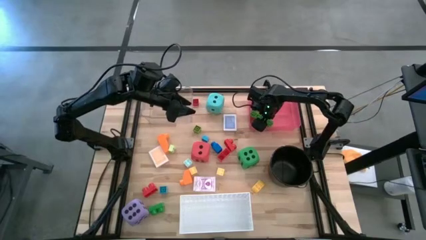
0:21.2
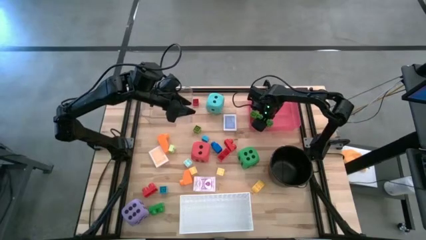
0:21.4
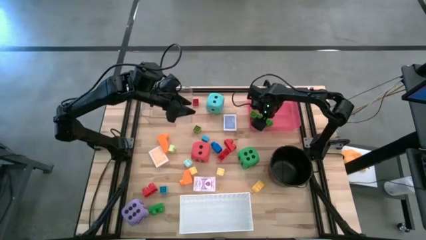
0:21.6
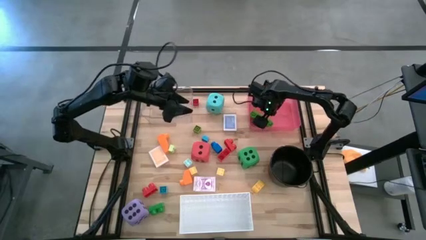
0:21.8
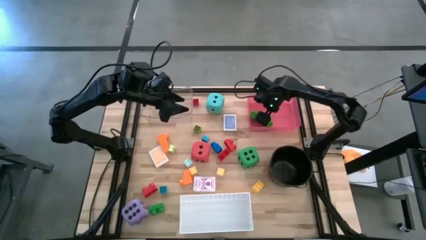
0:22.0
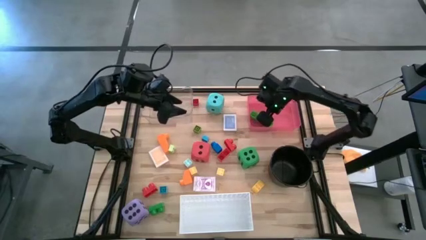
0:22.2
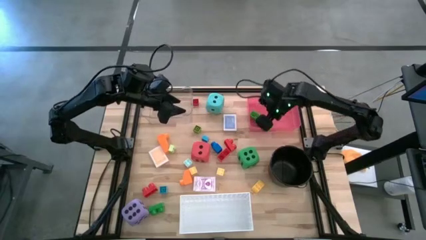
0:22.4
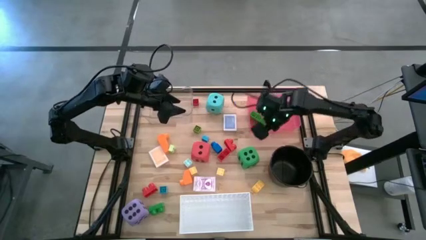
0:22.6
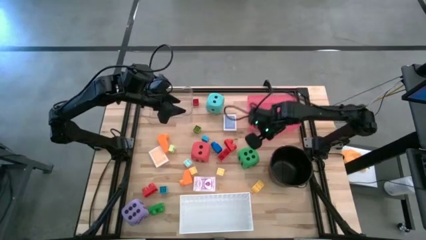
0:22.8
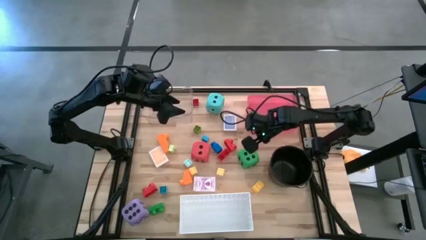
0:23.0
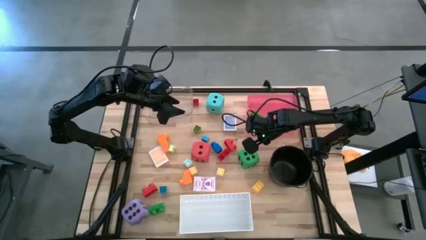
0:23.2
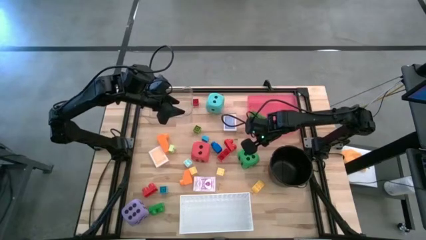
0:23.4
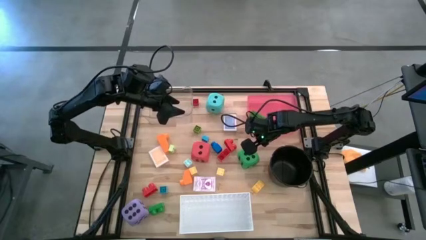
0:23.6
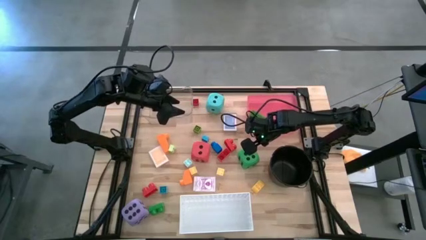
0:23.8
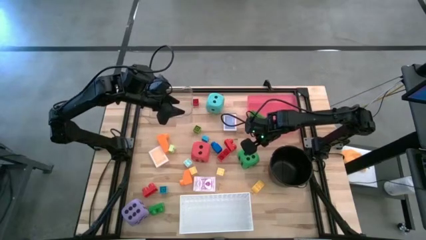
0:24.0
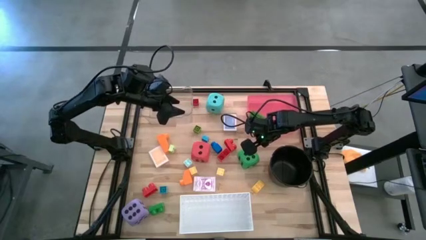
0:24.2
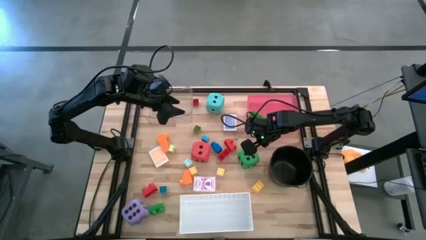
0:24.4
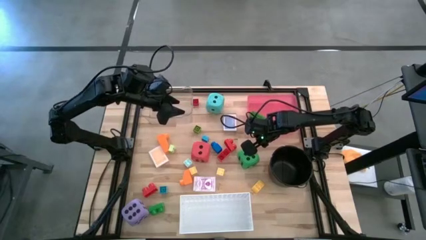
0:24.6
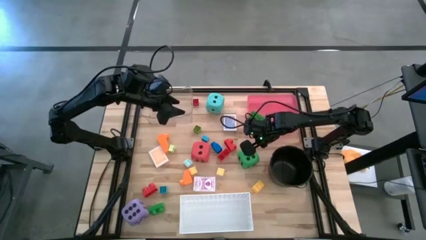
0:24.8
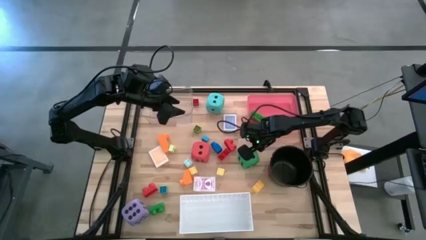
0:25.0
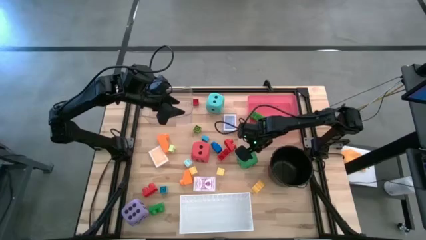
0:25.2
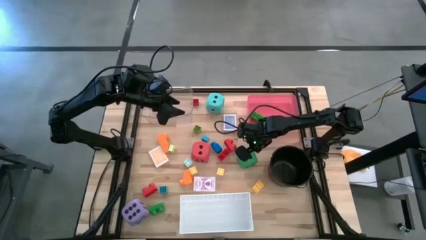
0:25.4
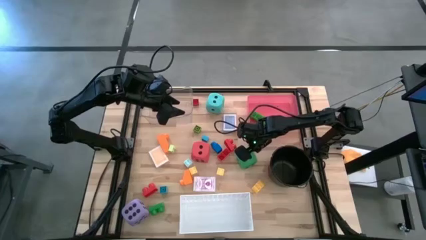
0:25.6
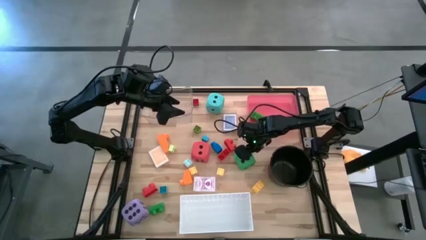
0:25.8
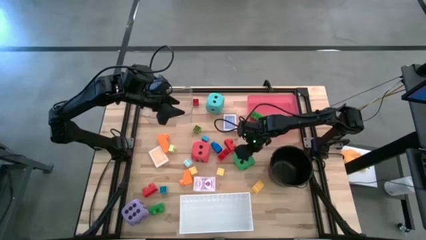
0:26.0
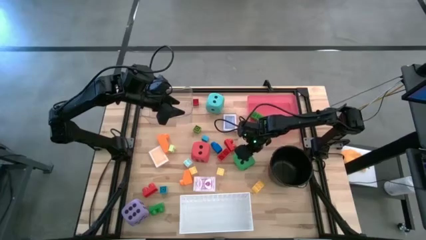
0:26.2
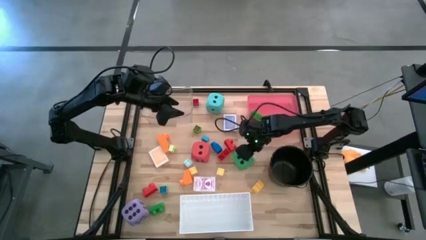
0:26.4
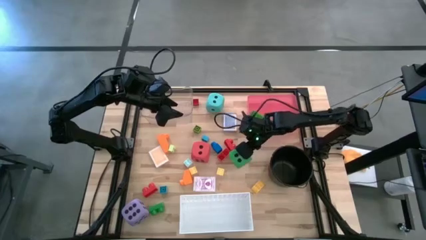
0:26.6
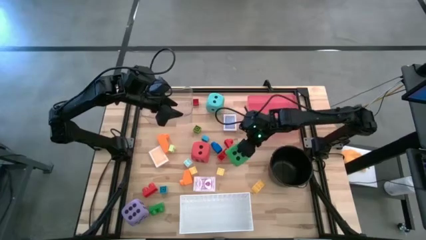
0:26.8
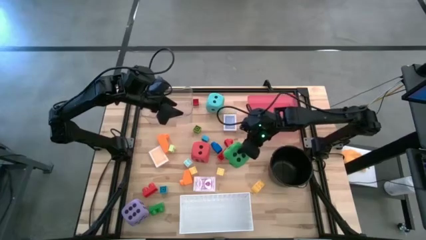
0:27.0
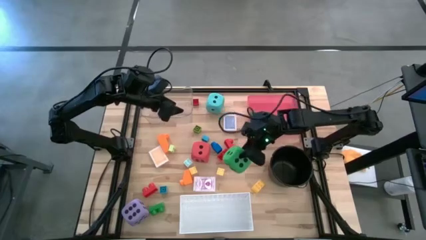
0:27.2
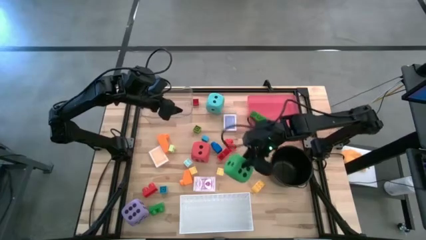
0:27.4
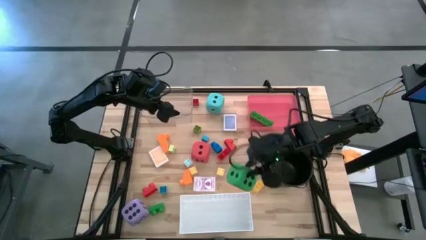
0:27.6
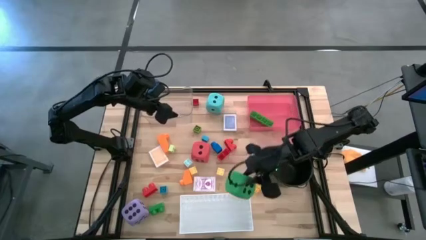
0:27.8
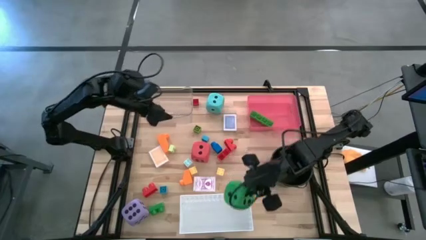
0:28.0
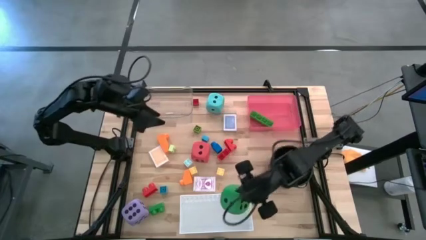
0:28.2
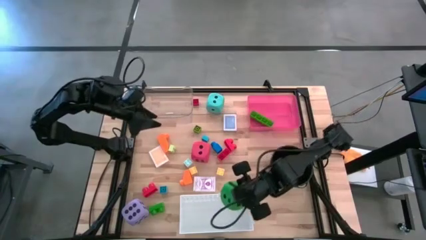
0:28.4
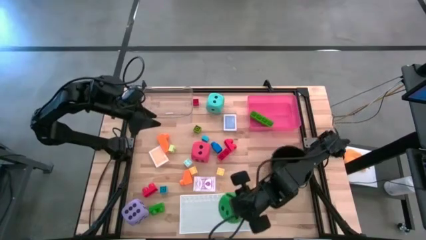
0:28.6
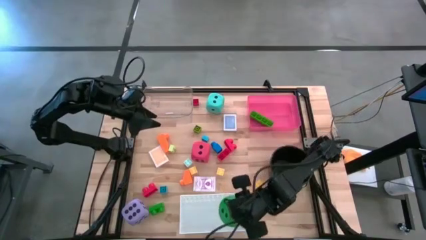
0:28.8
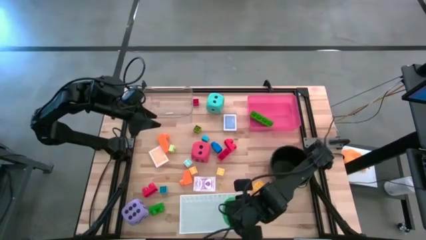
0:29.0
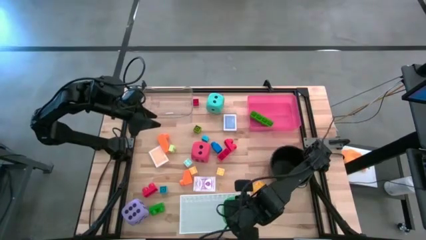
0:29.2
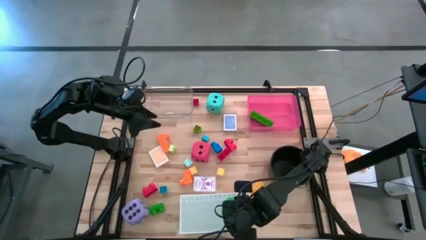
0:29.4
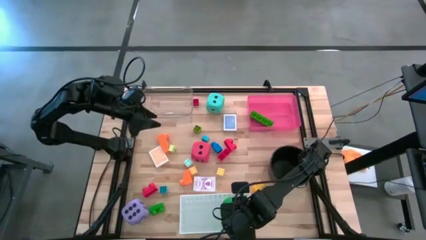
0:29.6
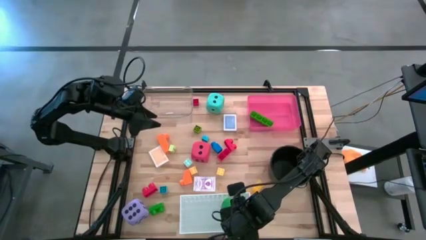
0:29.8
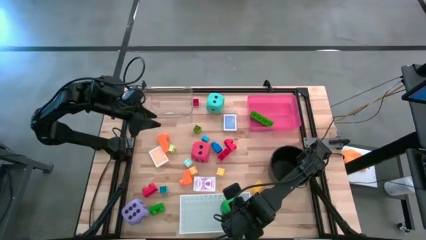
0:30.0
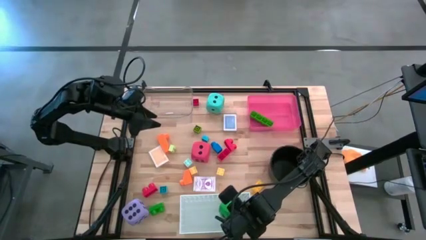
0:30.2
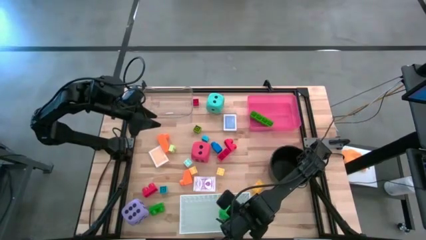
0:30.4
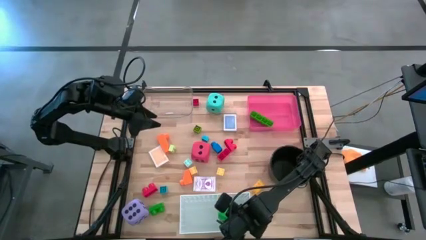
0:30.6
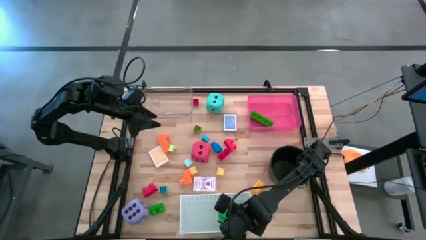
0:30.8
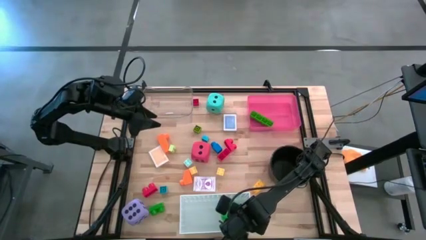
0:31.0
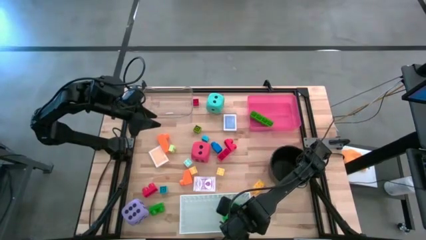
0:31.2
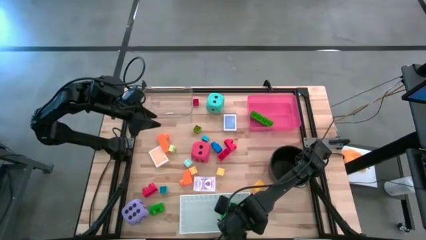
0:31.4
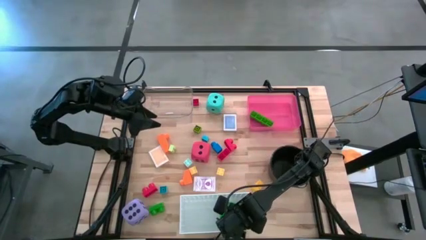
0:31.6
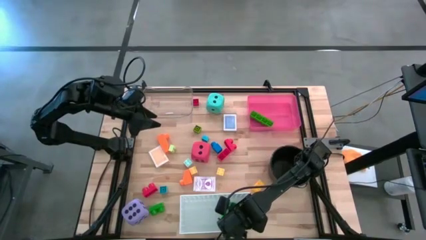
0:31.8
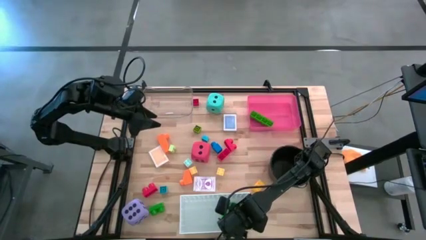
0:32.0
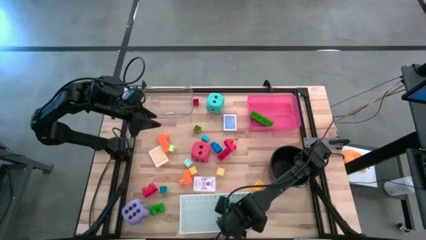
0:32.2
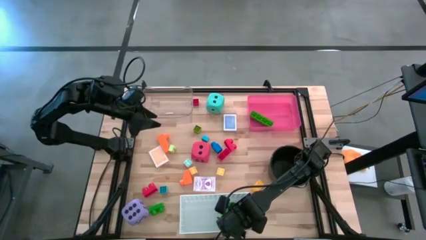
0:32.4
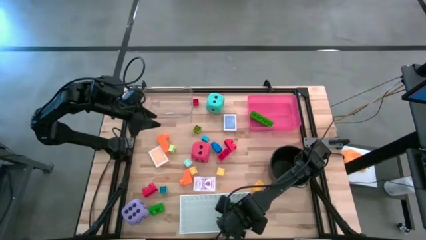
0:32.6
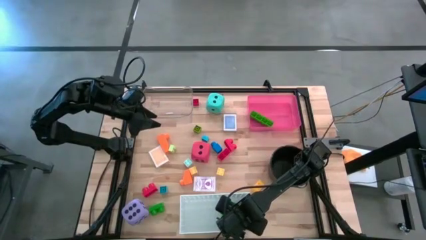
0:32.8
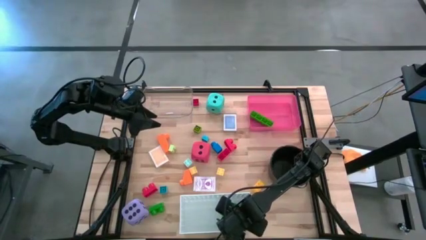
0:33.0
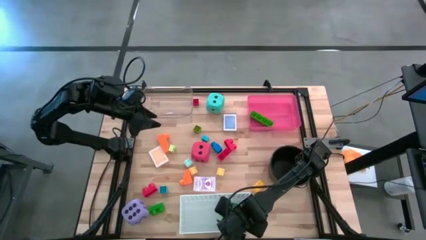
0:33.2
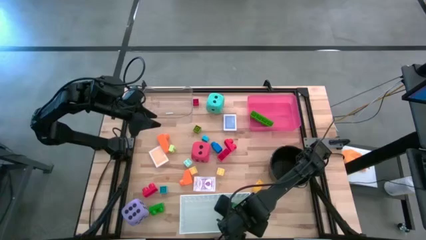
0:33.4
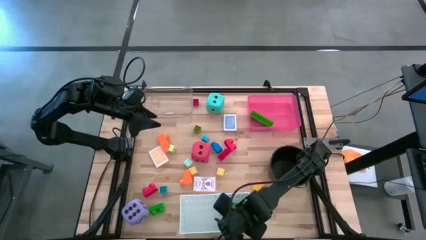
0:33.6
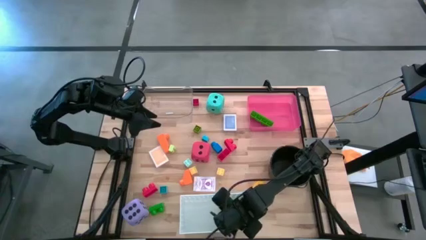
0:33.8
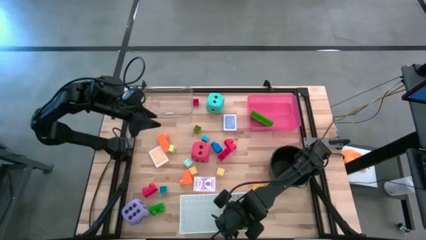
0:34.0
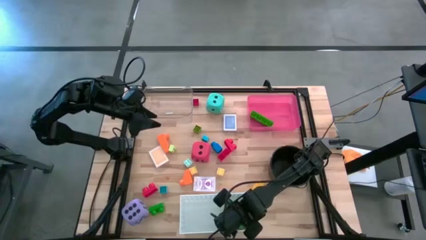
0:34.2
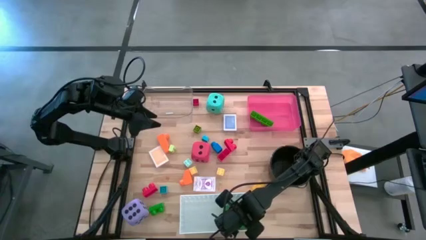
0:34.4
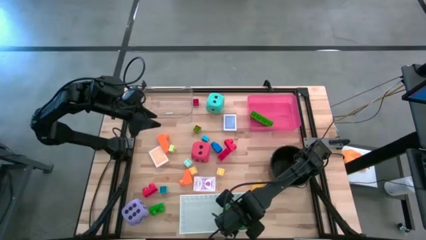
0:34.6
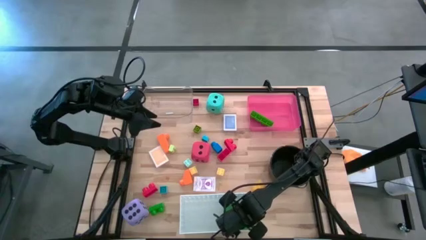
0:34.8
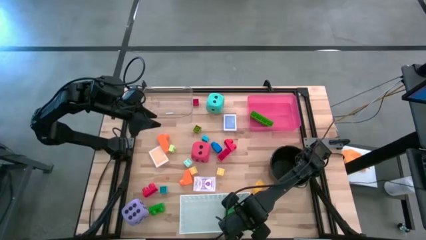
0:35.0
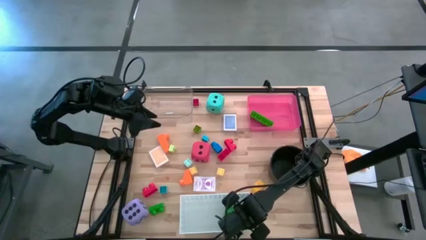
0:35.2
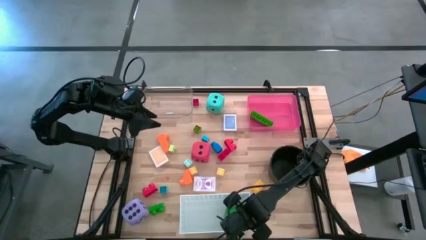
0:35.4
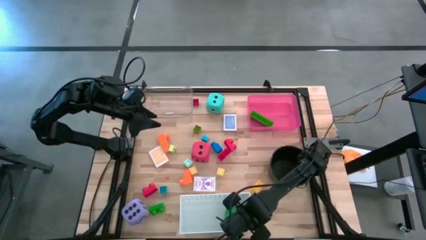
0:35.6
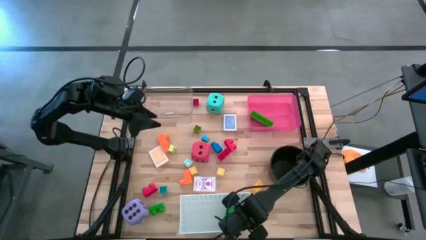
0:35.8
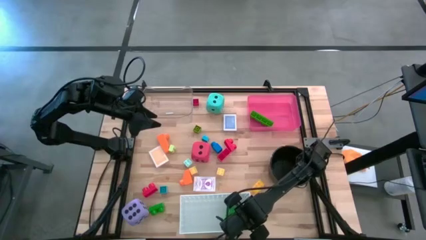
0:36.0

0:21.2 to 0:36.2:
Task: Pick & Place Toys
Put the green dice into the white bin

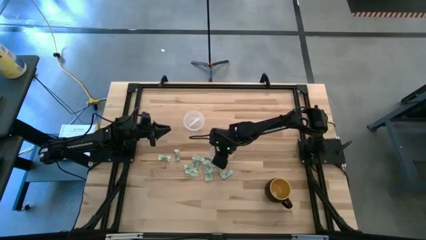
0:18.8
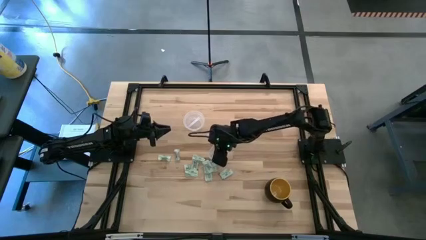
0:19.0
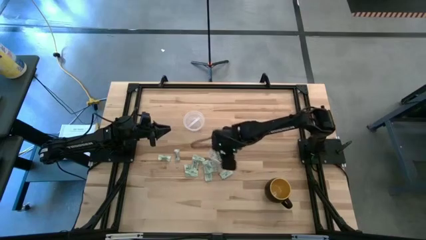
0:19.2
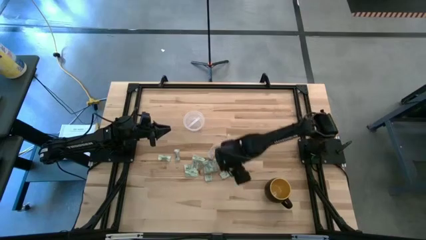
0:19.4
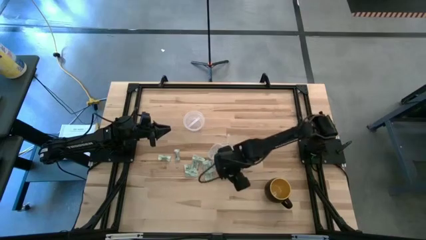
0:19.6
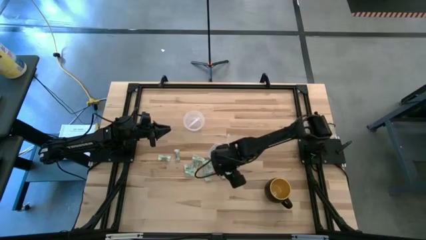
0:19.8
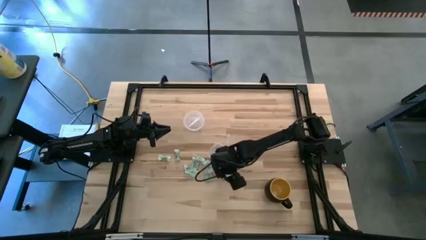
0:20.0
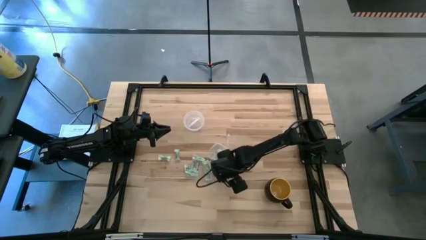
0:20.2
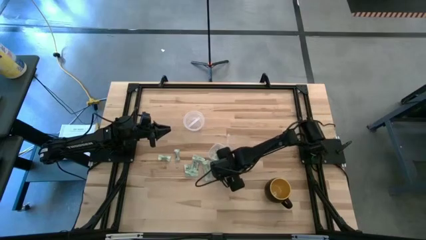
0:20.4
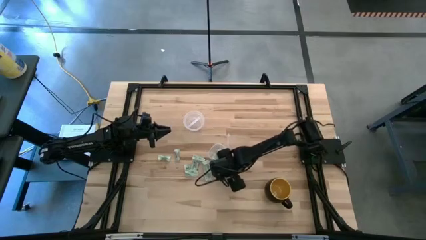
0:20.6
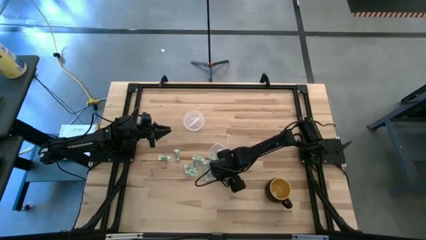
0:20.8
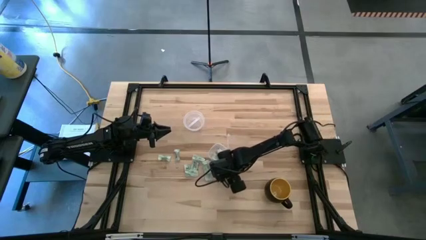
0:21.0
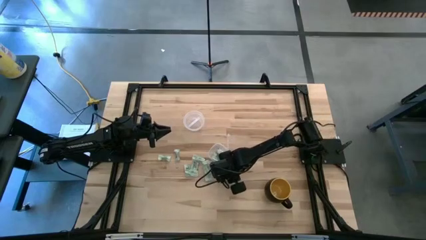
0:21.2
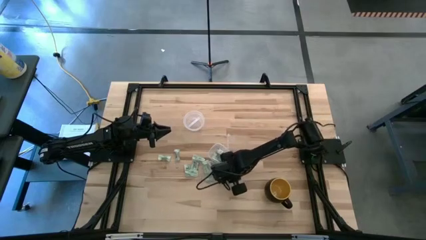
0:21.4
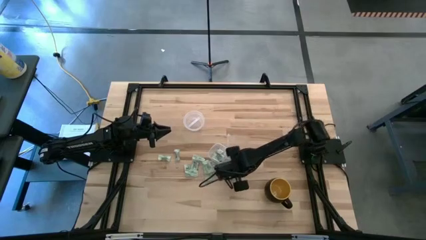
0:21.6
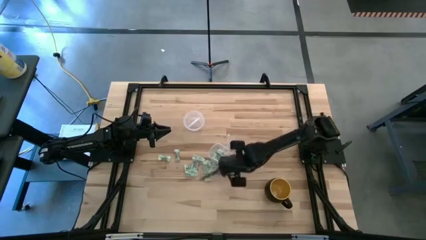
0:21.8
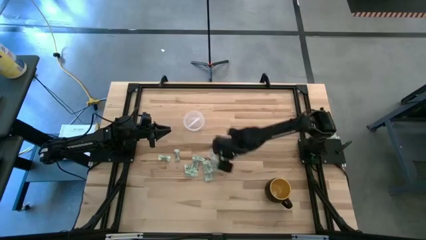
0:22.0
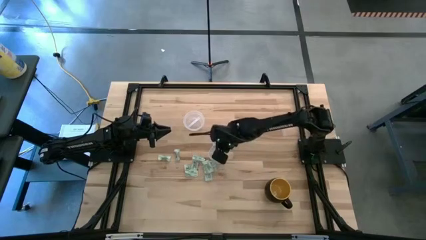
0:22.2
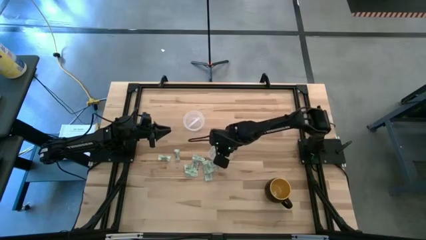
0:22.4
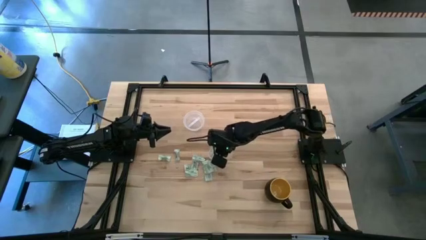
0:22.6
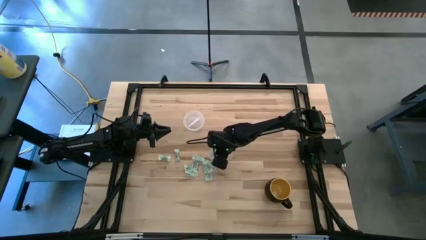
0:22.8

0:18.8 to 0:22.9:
Task: Pick and place items into bin
Put the light green stevia packet into the transparent bin
